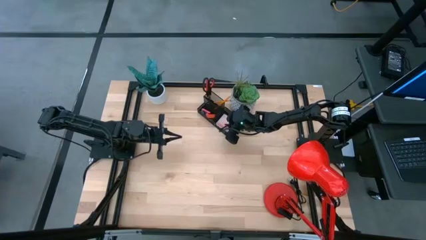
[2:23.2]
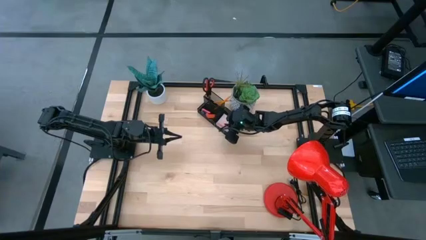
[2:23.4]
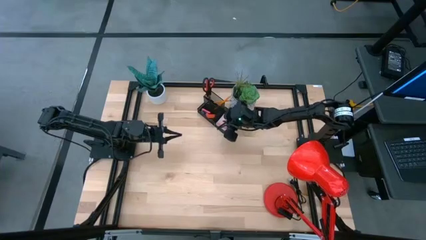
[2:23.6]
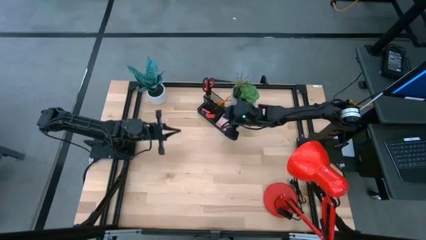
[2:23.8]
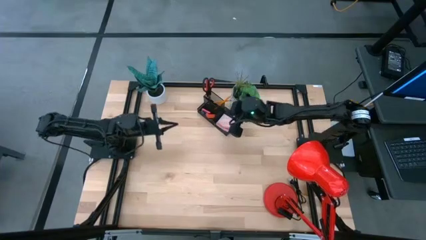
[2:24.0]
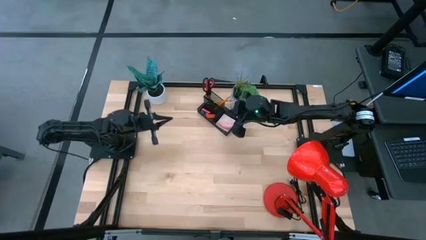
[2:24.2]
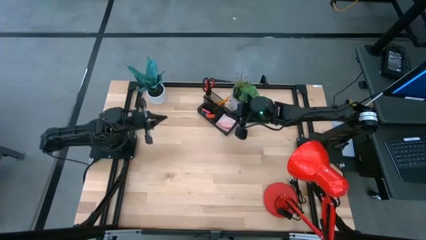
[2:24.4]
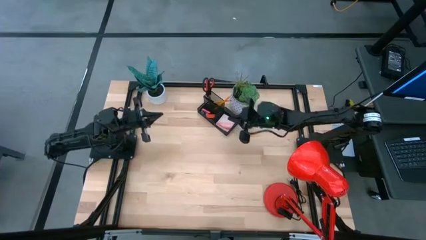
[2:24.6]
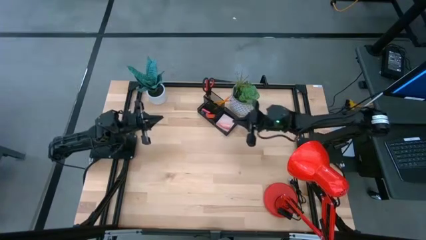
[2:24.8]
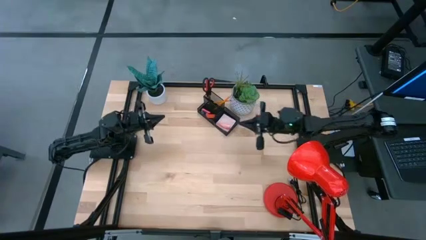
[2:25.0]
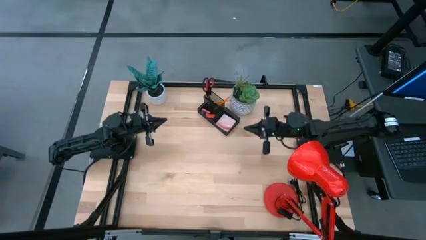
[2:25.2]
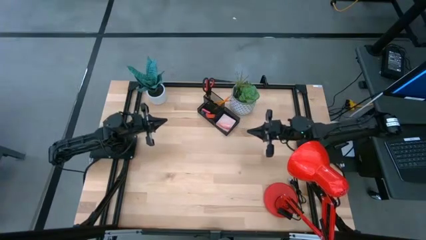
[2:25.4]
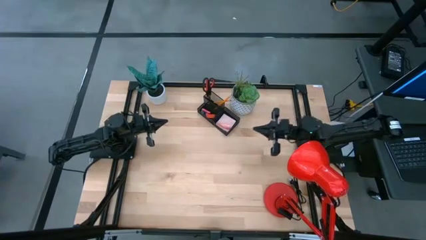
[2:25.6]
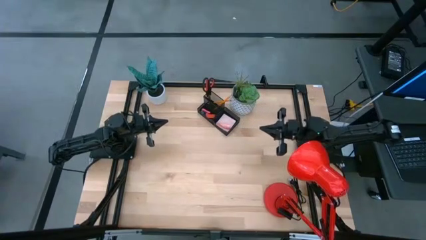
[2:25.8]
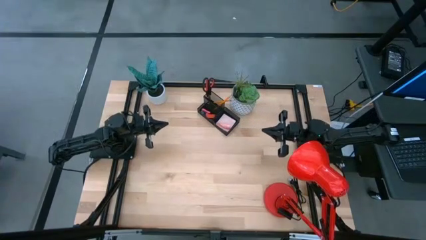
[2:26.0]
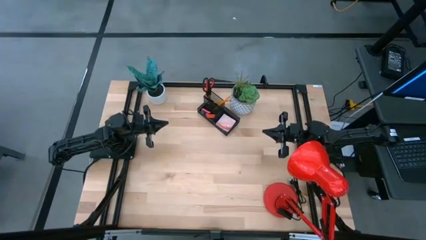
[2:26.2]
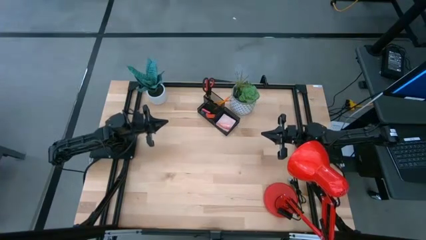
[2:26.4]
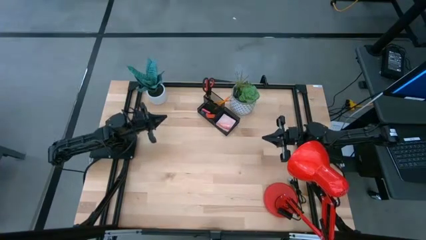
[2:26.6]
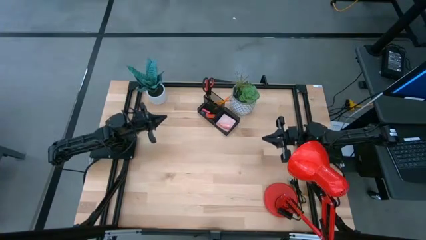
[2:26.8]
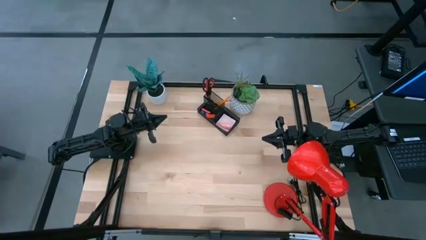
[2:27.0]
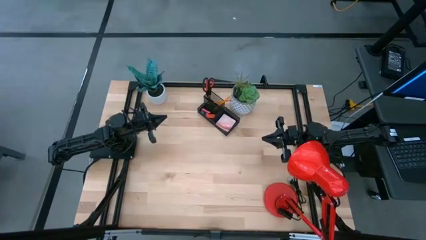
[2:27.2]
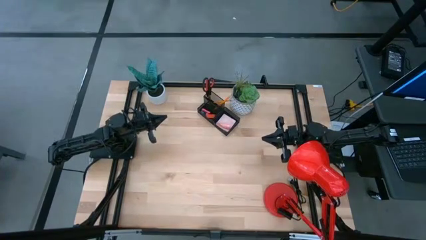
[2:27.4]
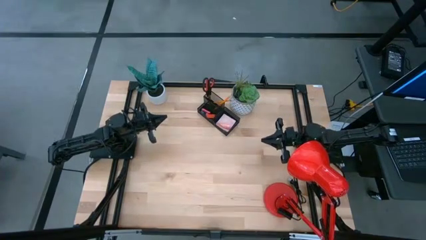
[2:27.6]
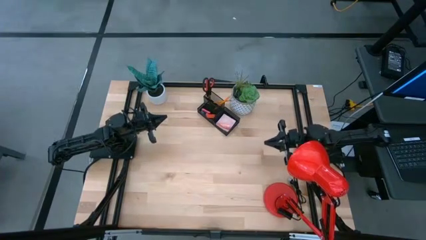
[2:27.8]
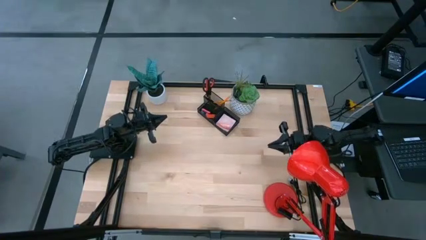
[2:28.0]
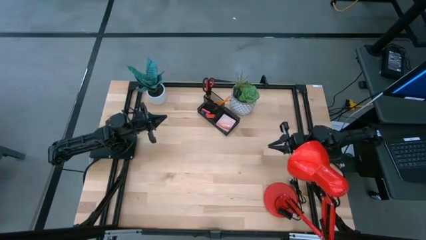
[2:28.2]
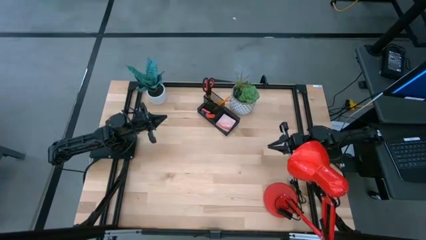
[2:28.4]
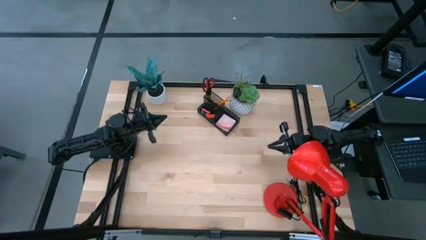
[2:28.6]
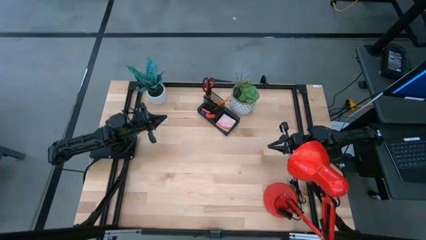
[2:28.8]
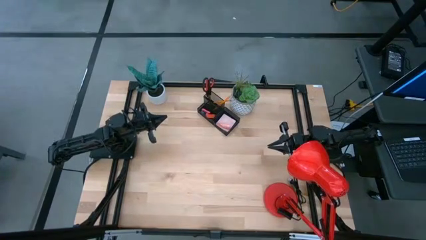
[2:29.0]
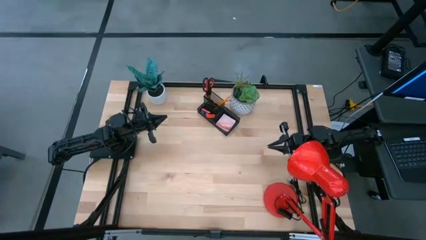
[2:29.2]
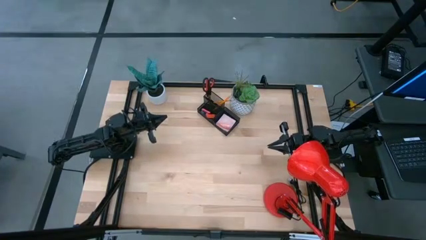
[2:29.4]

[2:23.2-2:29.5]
Task: Pick and place office supplies into organizer
Return to Home Position

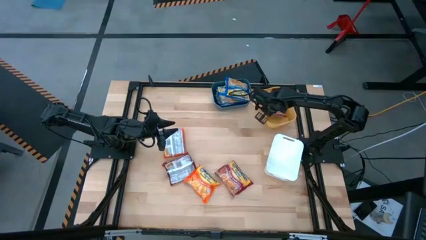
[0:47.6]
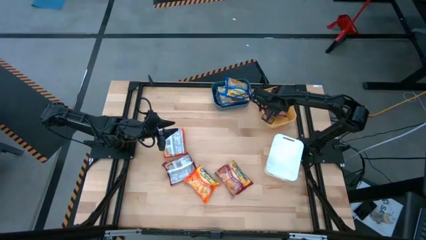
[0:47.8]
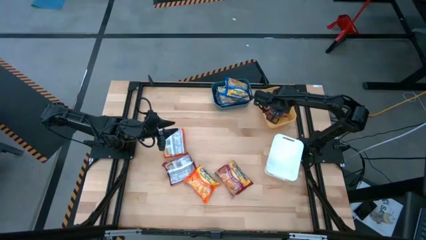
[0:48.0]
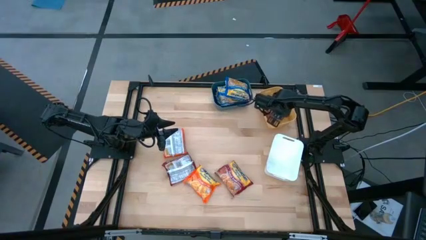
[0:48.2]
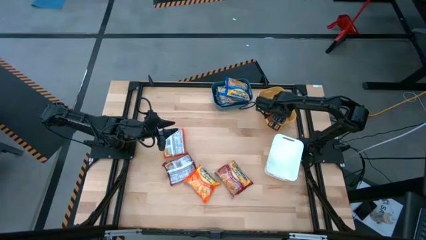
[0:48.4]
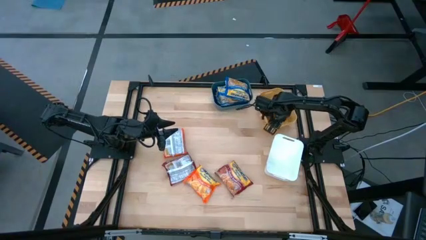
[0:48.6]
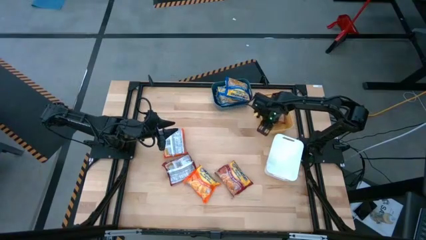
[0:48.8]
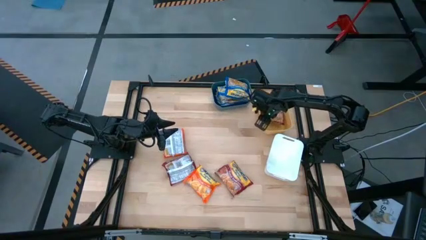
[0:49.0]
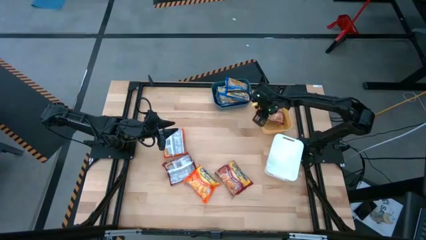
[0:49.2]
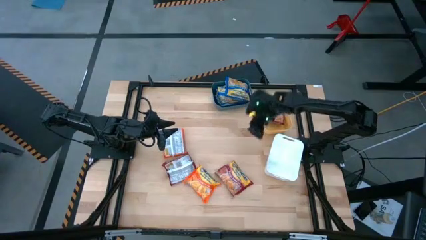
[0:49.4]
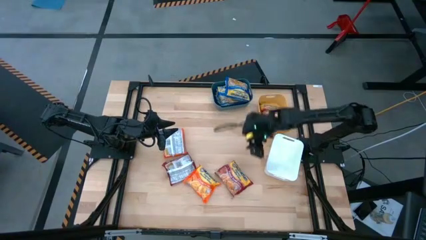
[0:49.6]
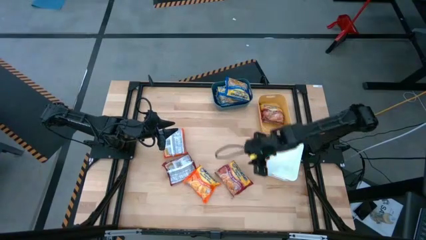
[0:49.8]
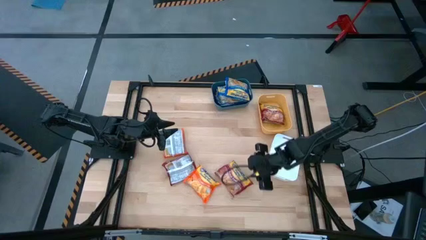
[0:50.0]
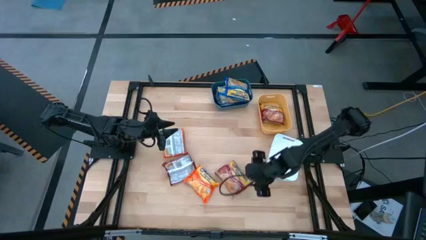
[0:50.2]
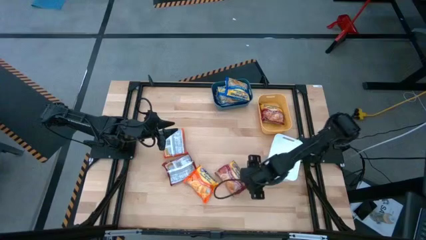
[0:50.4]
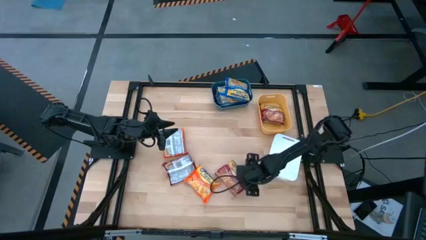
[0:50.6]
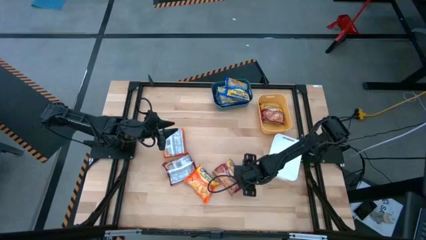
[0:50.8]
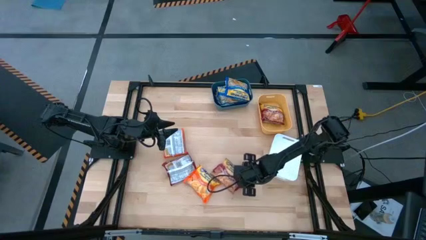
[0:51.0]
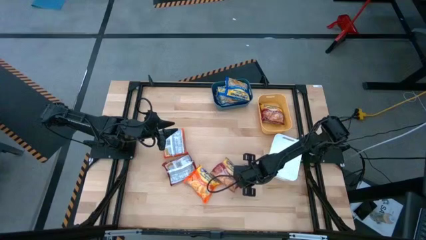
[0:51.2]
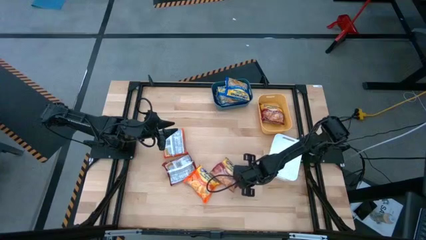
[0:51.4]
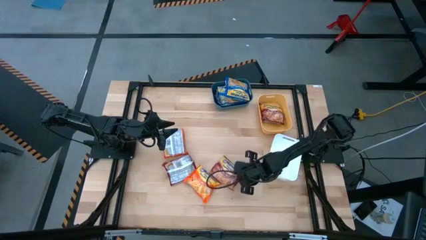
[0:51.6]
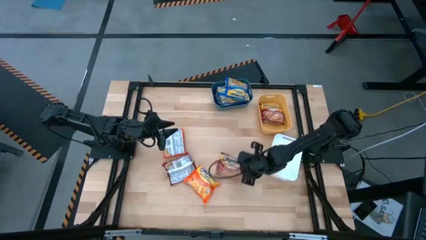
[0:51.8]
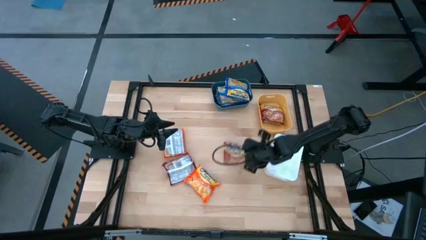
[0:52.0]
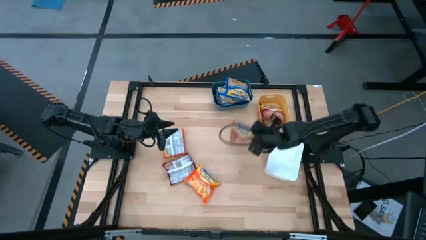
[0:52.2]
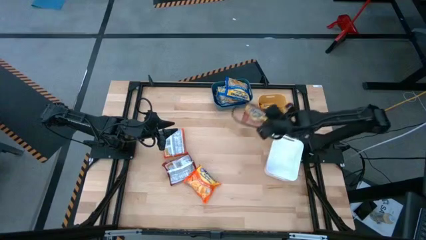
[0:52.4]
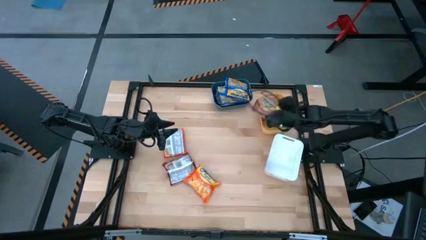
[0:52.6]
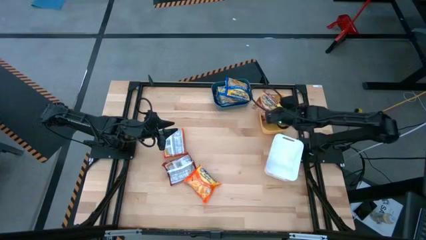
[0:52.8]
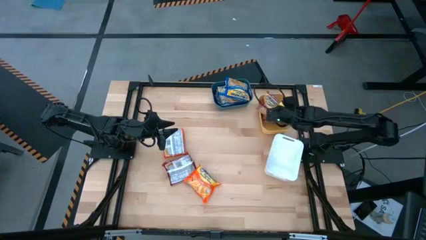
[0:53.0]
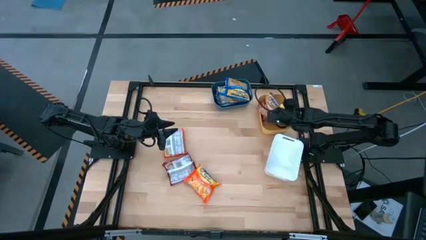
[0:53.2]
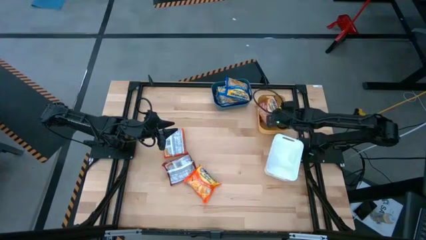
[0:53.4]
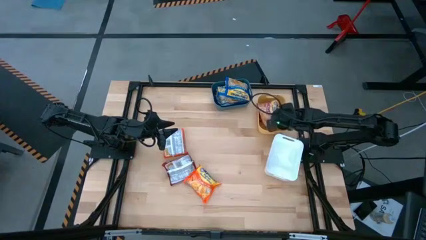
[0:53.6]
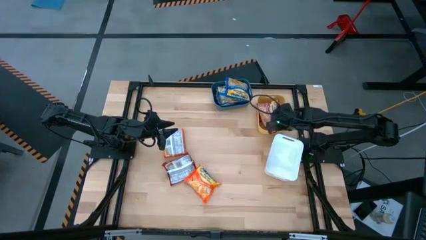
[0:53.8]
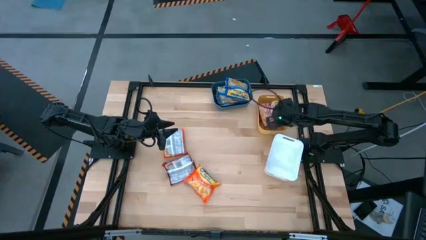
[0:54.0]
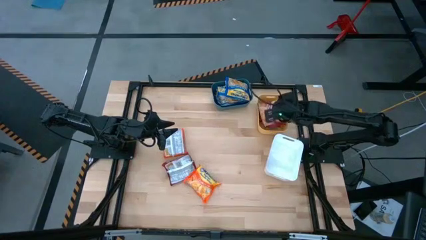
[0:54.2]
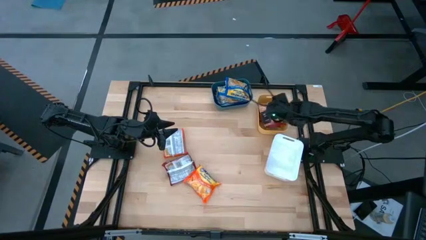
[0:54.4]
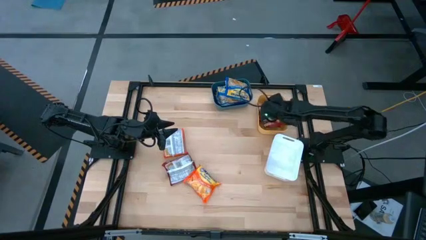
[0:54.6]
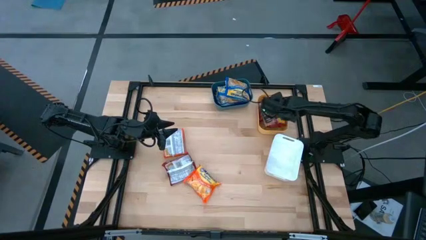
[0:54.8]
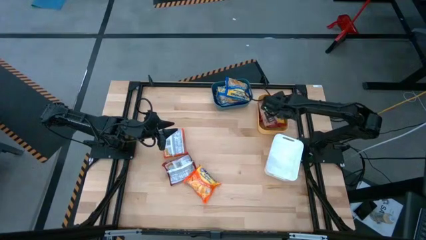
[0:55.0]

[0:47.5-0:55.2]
Task: Sort Maruchan noodles
Put the right red noodle pack into the yellow bin
